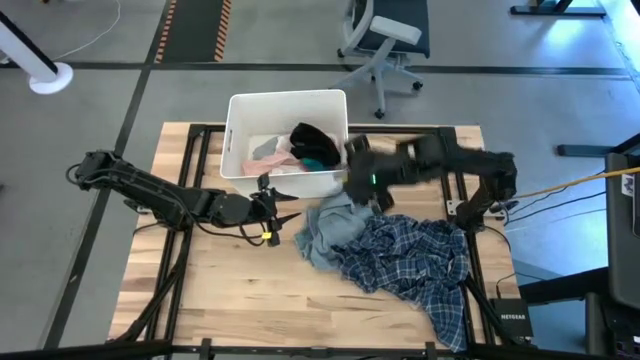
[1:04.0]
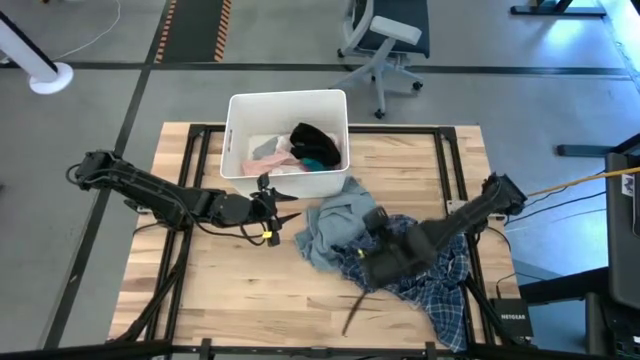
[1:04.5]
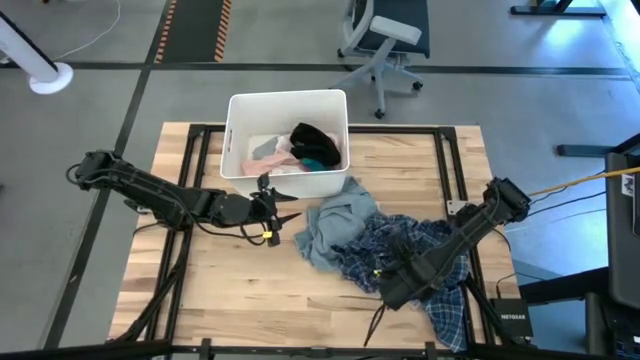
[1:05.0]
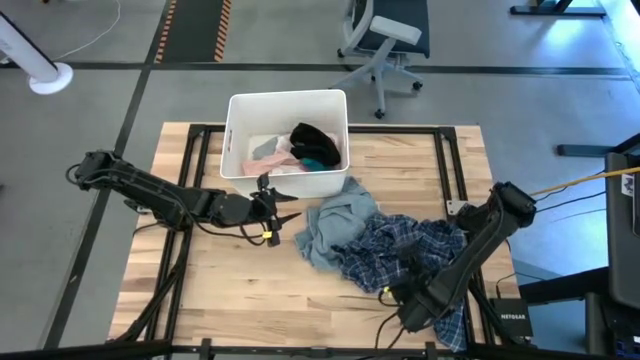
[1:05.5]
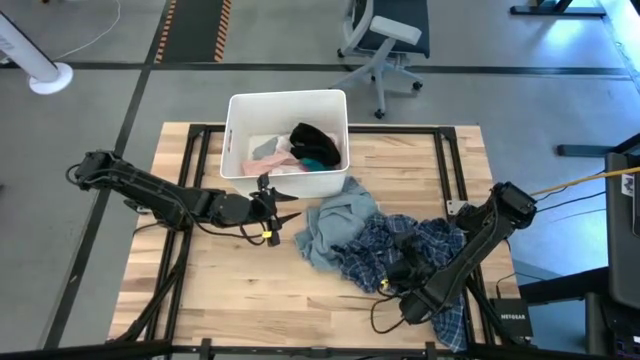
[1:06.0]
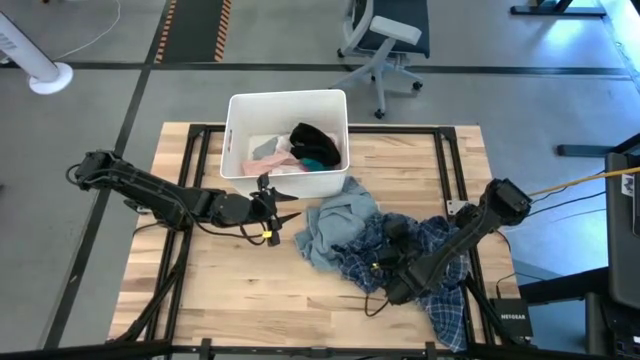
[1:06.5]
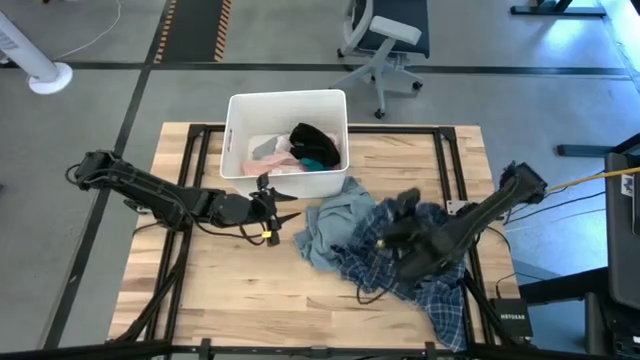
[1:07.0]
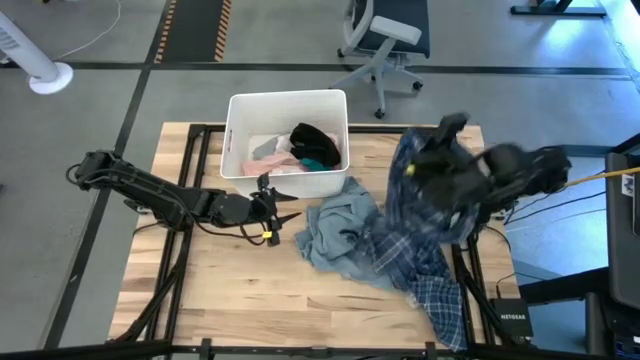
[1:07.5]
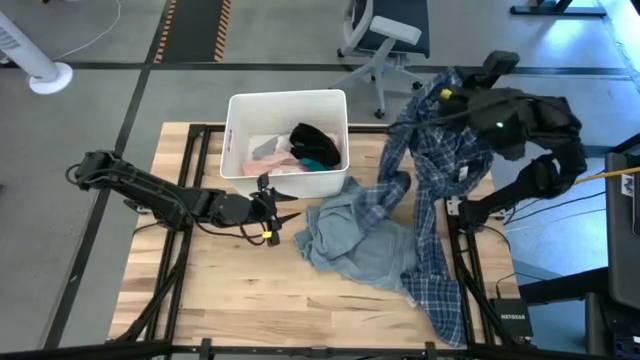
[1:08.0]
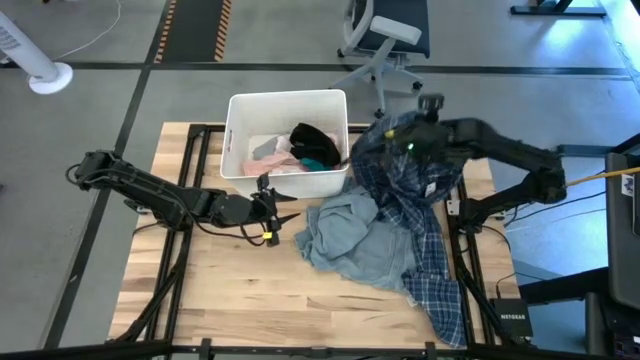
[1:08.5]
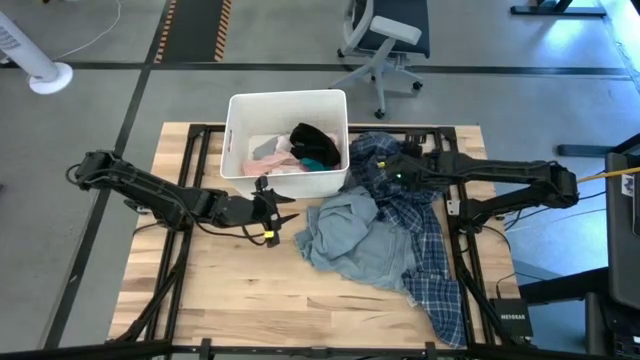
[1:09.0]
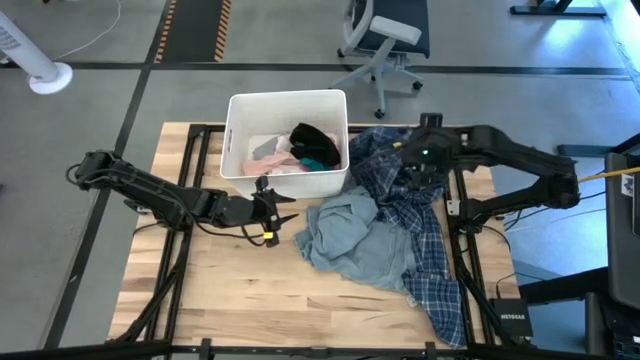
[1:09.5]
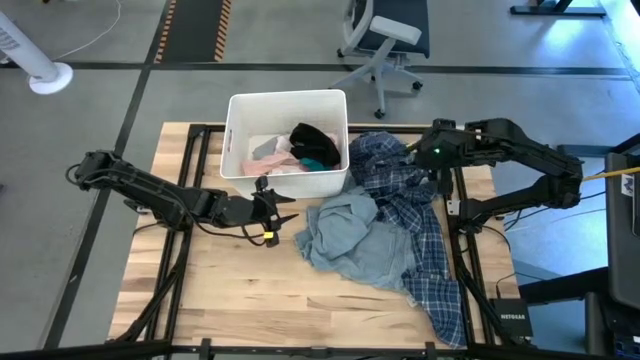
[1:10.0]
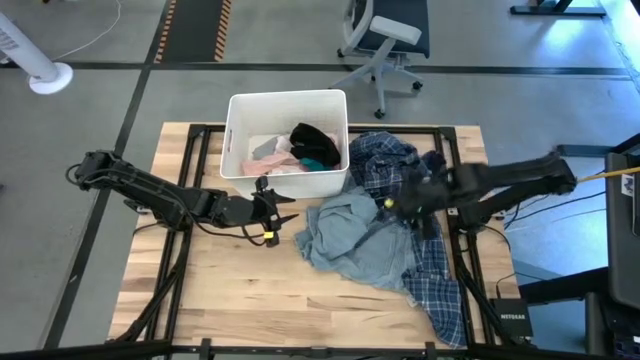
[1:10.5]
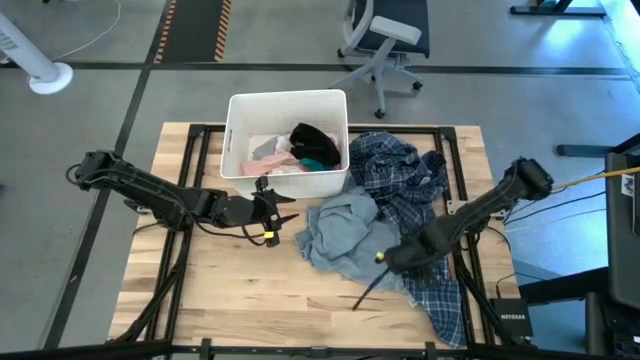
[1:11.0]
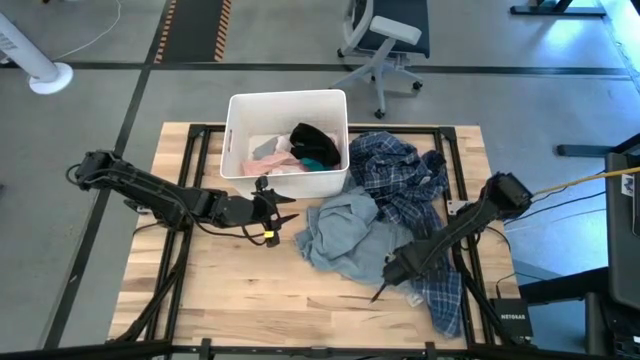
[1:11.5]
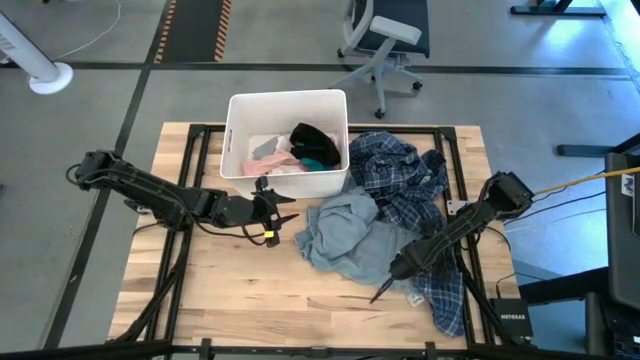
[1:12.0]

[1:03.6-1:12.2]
Task: Sort clothes
Move the blue patterned pants to the top right of the table

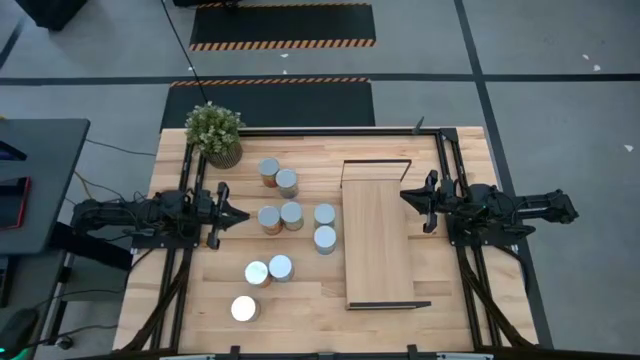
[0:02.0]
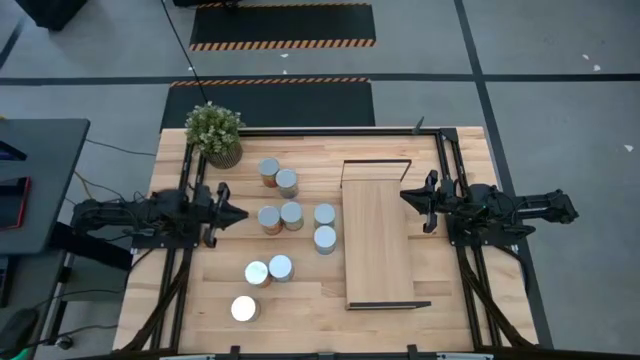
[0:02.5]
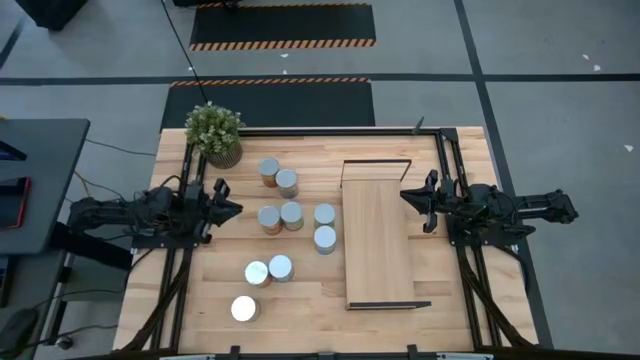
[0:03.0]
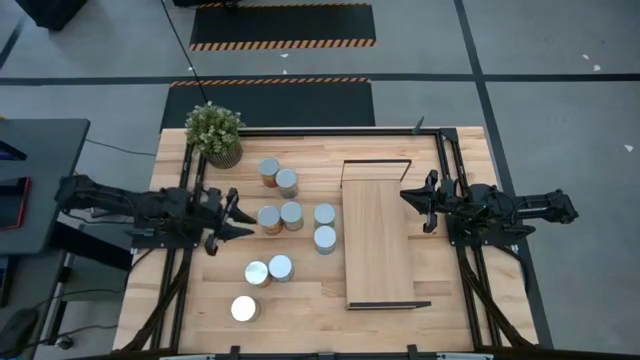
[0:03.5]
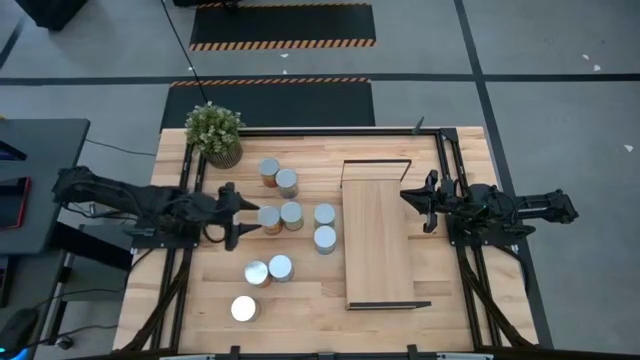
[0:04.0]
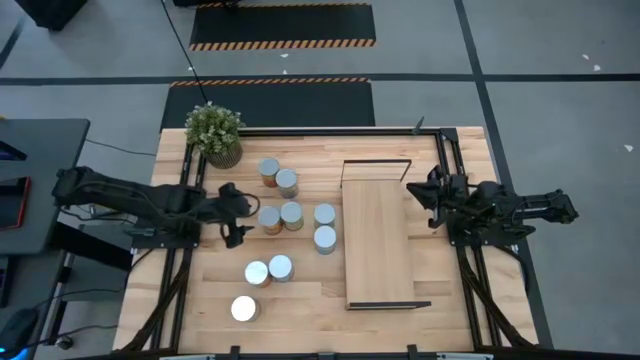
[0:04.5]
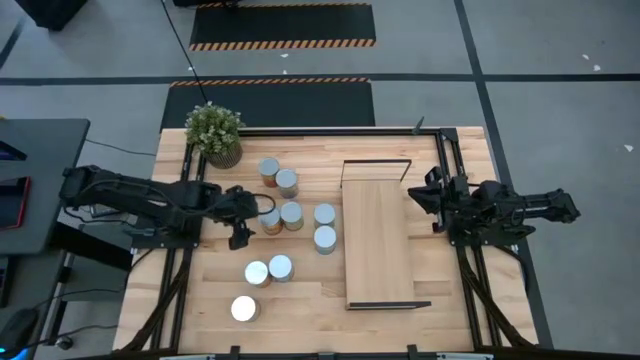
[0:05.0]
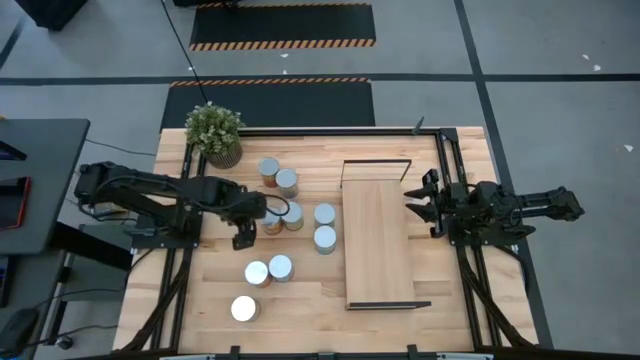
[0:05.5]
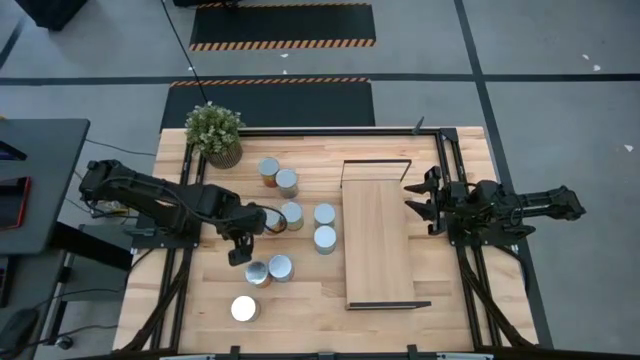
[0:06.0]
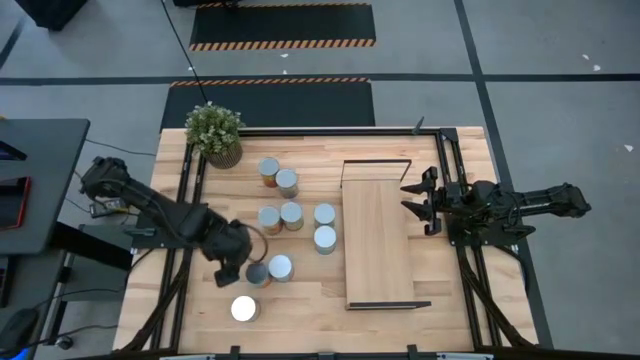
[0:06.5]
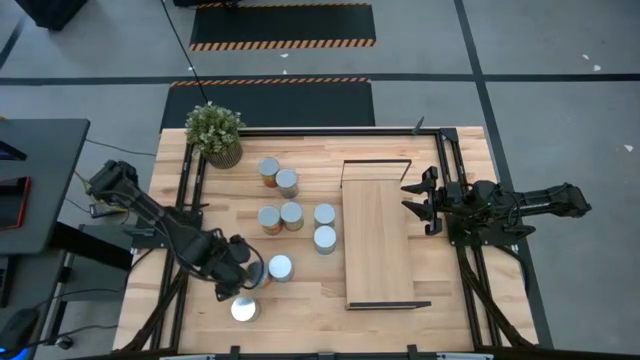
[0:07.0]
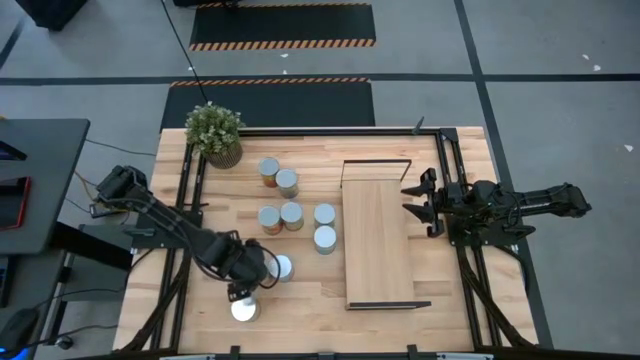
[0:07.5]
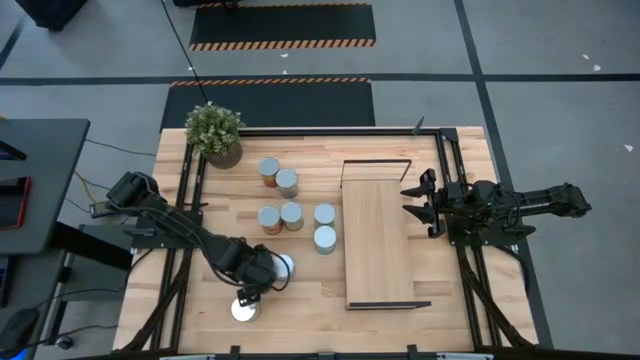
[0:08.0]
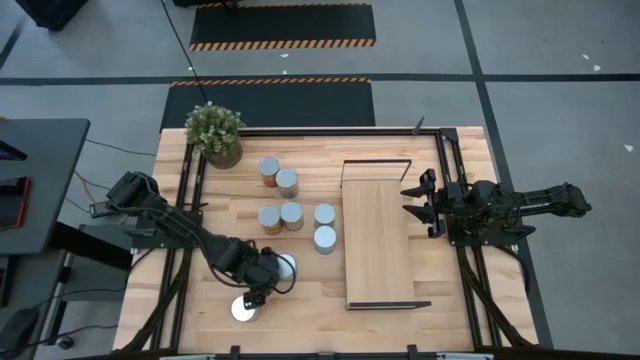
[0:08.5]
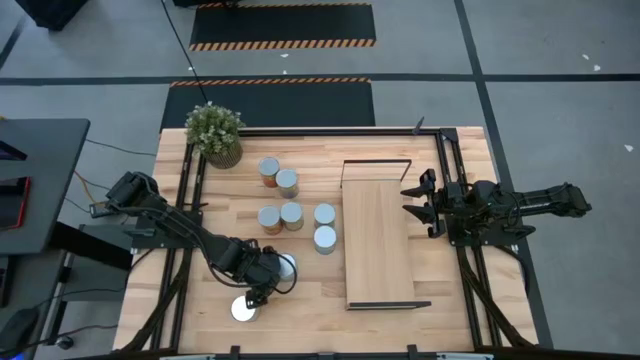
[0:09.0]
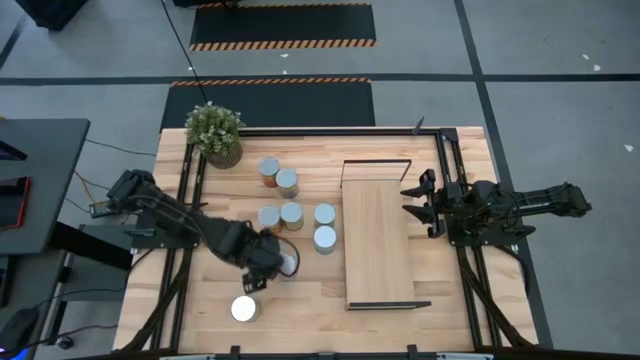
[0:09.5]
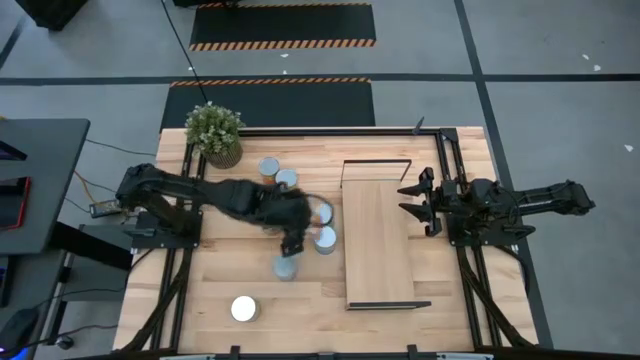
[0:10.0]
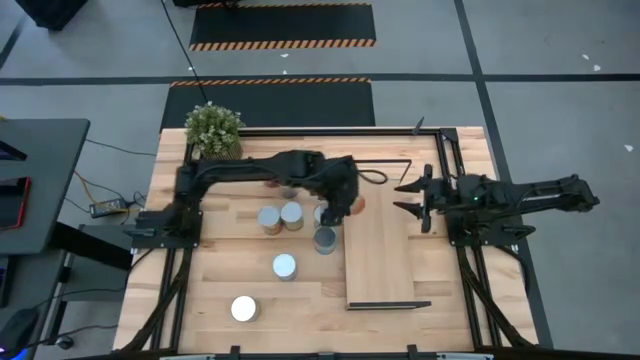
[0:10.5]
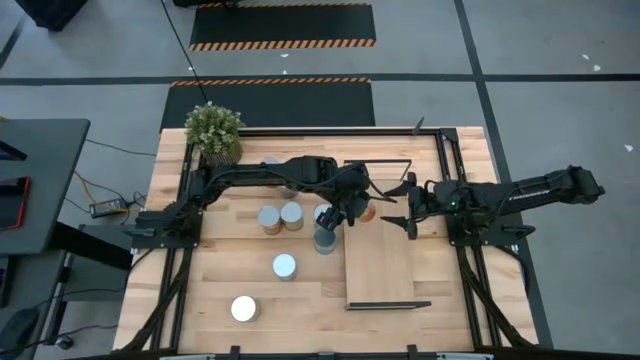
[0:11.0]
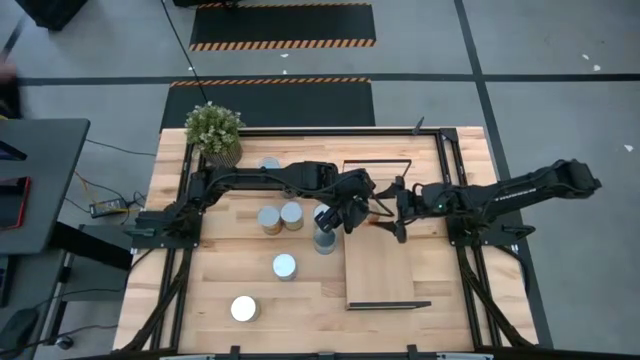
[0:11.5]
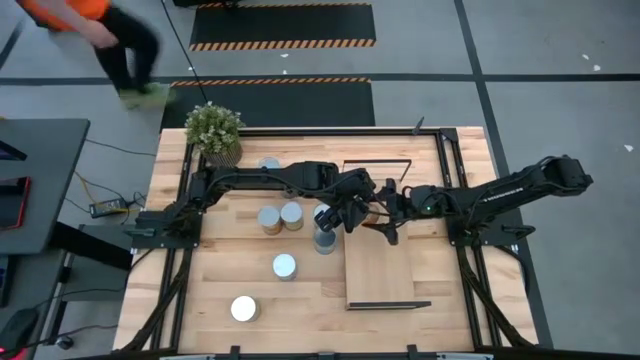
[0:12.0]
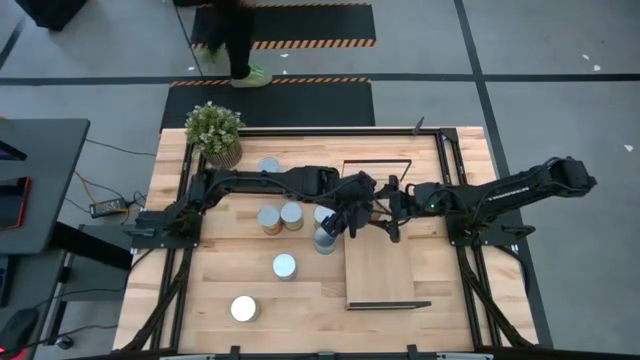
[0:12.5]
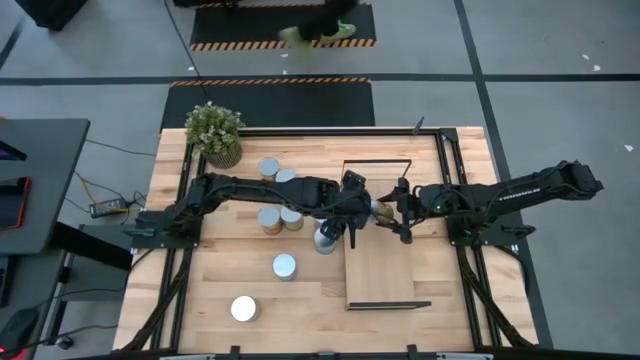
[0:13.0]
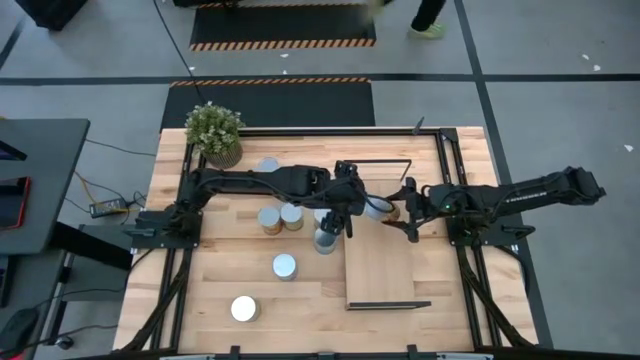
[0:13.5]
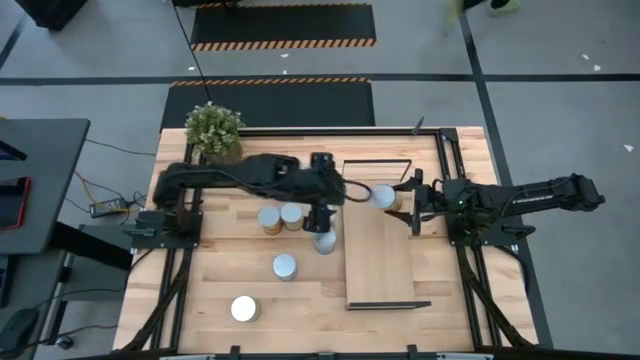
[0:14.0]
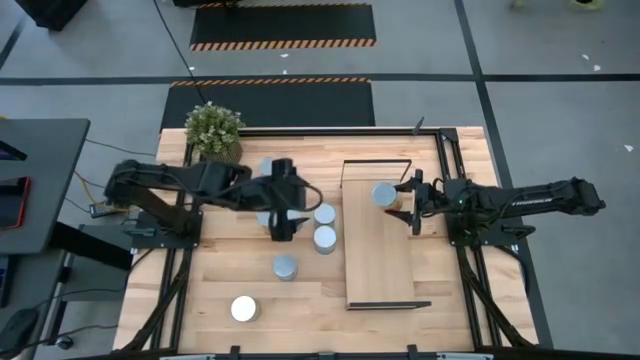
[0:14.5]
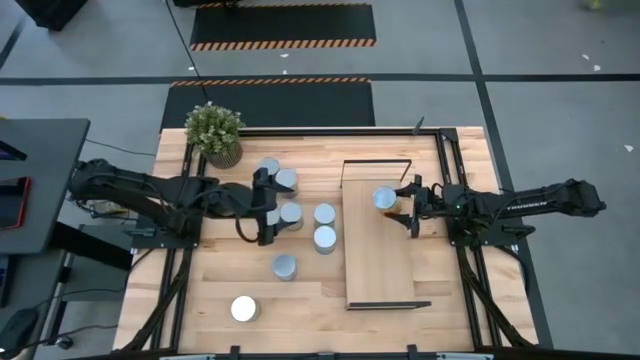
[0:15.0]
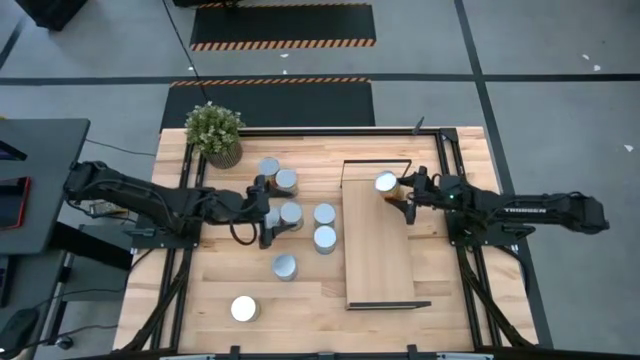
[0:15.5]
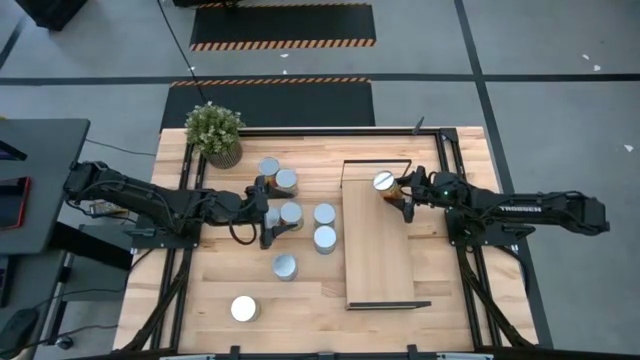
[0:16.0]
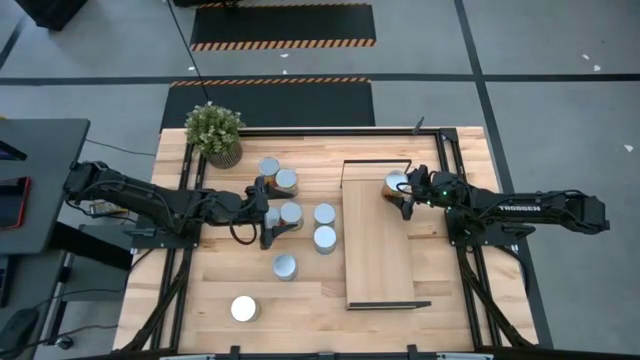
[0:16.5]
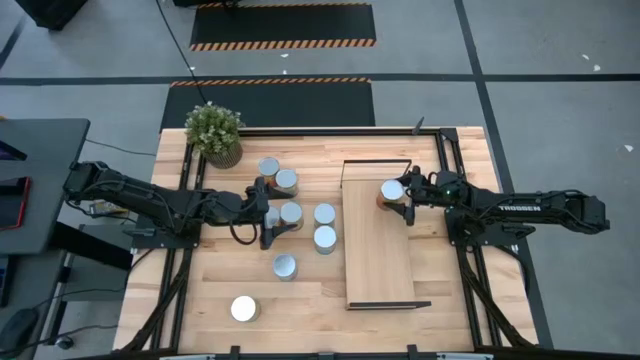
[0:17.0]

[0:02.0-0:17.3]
Task: Pick and place cans onto a shelf
Put the bottom canned pineapple on the shelf
